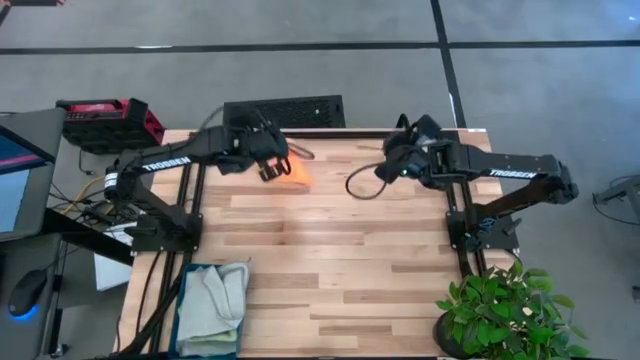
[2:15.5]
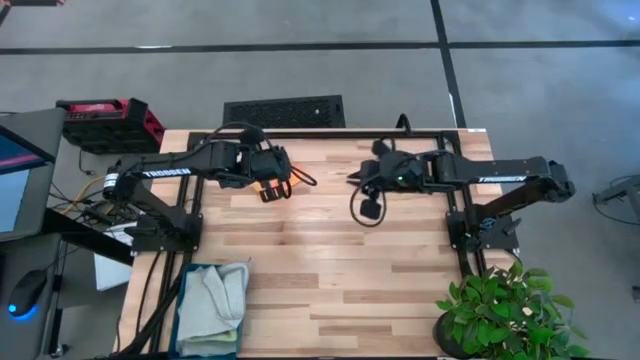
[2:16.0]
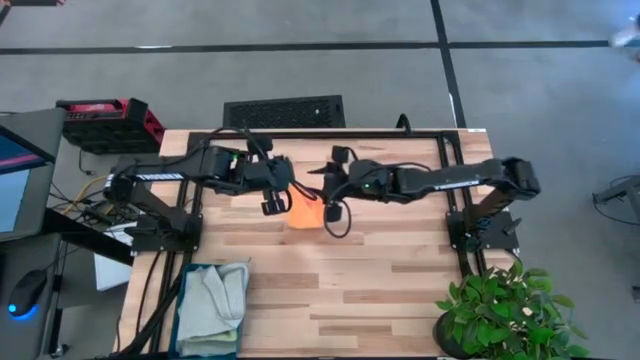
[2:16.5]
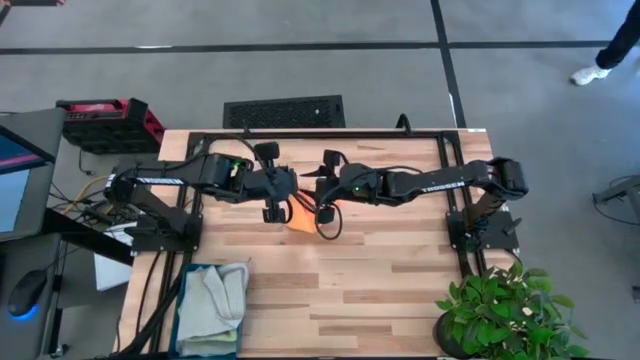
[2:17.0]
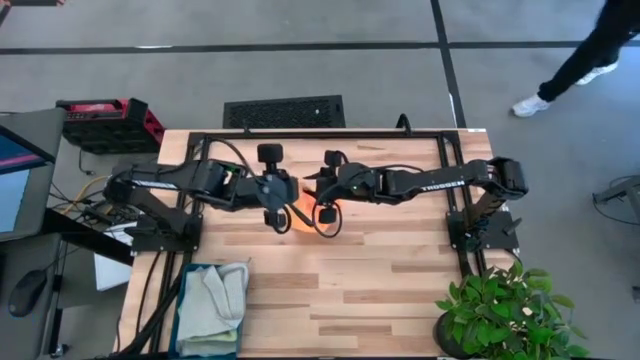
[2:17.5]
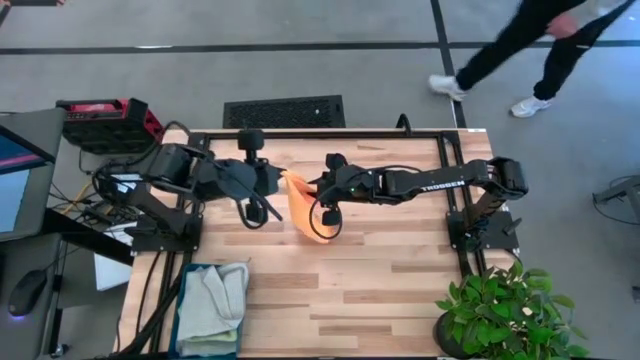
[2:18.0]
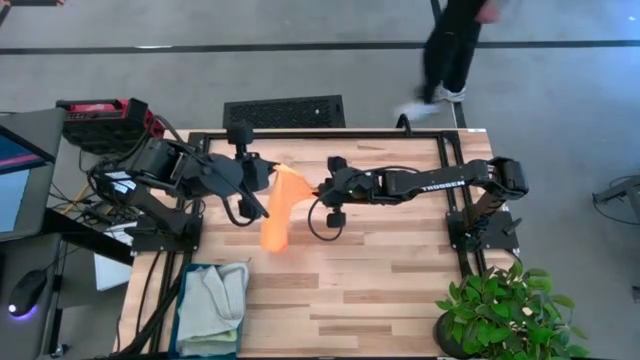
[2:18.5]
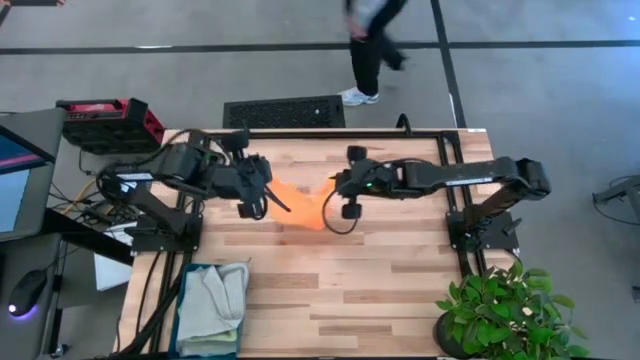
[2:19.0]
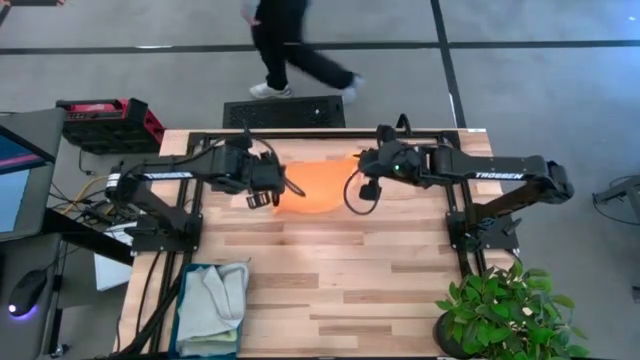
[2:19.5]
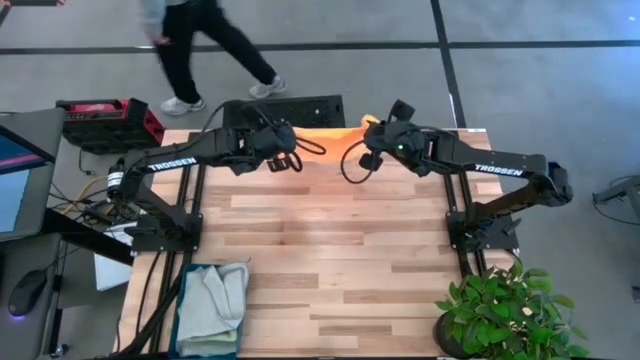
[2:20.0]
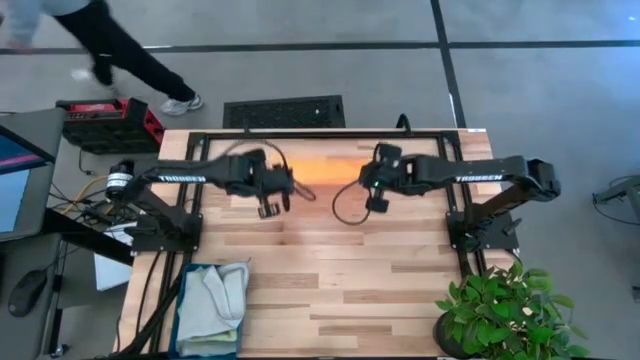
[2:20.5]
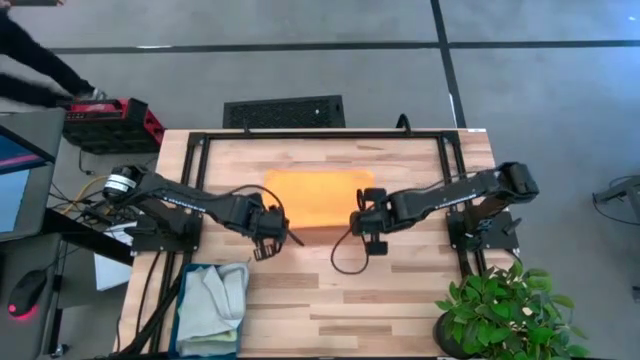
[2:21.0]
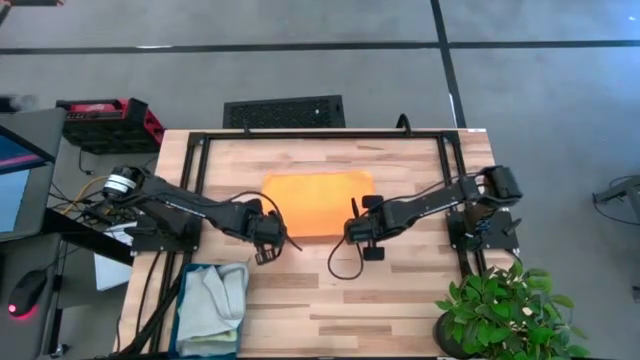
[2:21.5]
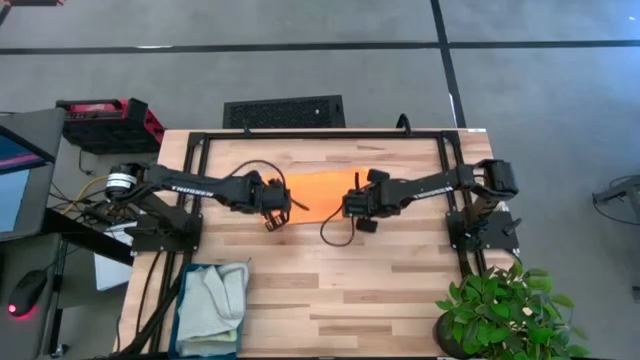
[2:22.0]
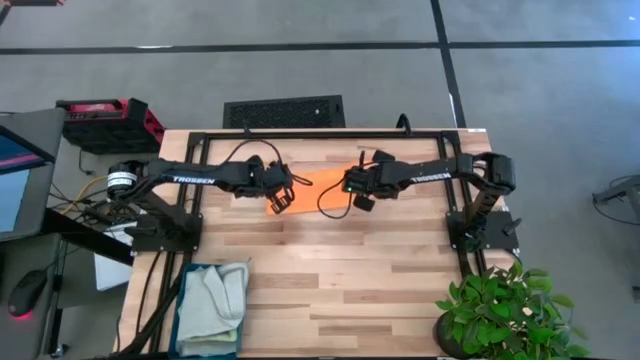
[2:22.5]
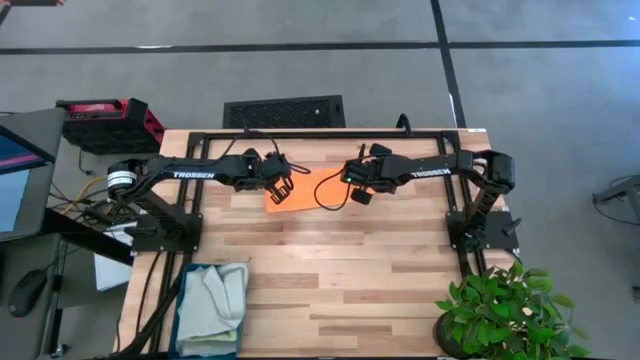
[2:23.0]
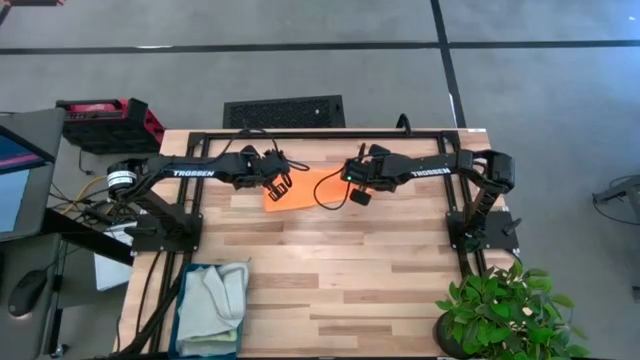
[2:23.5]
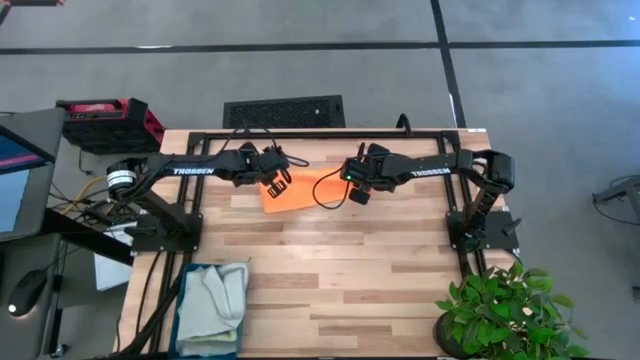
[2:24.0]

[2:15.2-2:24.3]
Task: Fold microfiber towels
Fold the orange microfiber towel

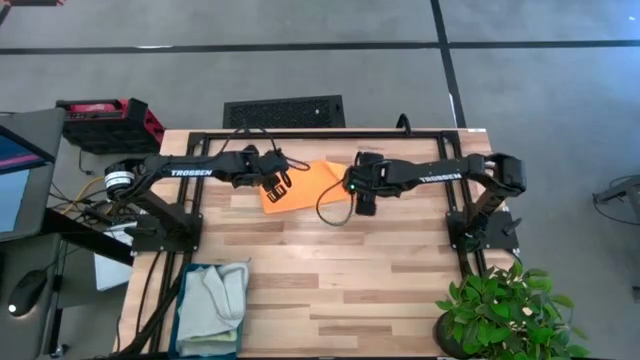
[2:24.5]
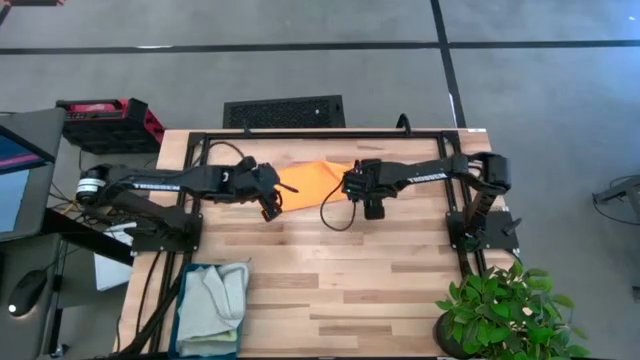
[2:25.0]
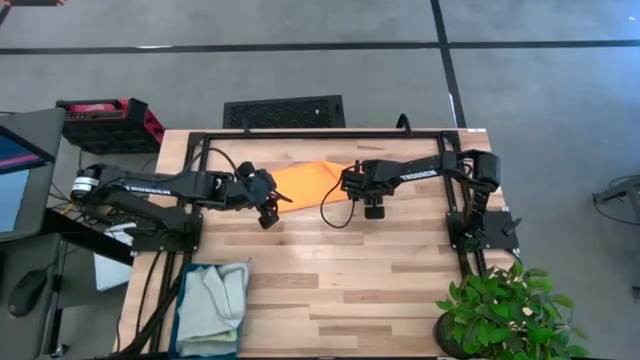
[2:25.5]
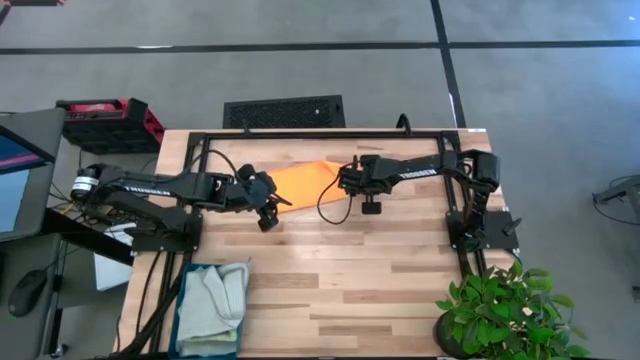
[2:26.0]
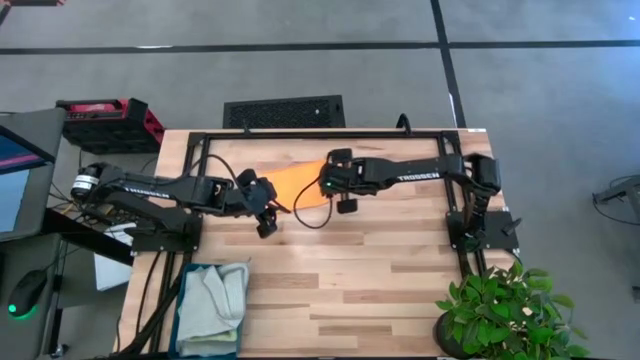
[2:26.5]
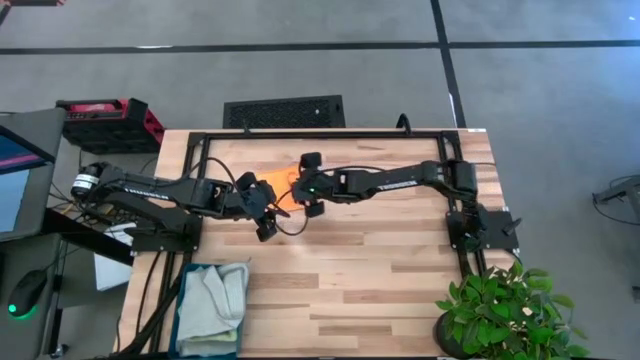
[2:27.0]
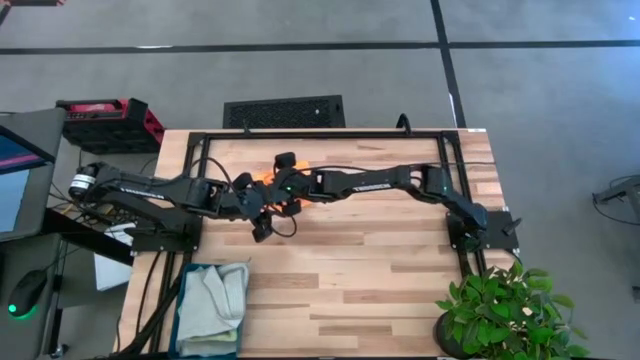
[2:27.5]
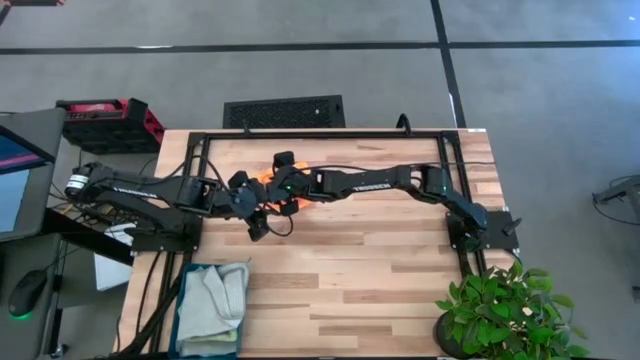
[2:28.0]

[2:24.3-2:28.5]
Fold the orange microfiber towel

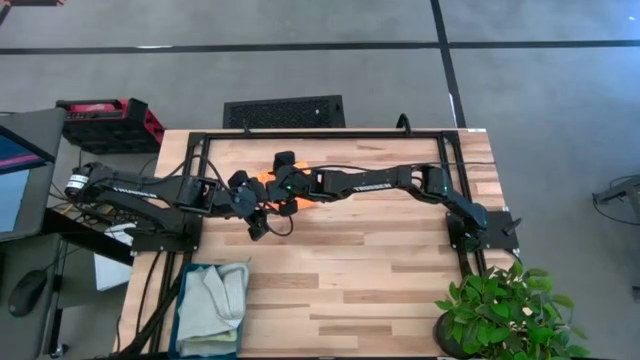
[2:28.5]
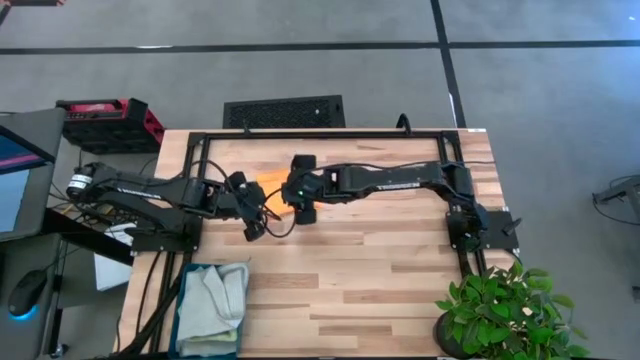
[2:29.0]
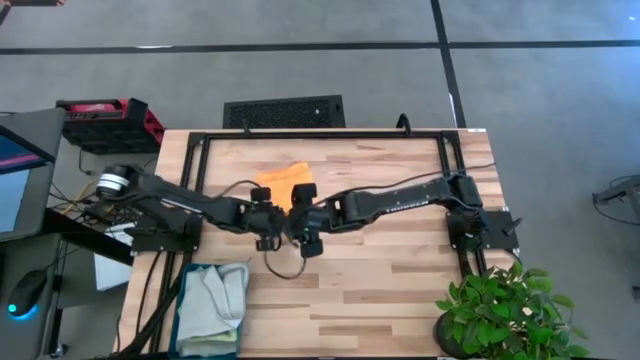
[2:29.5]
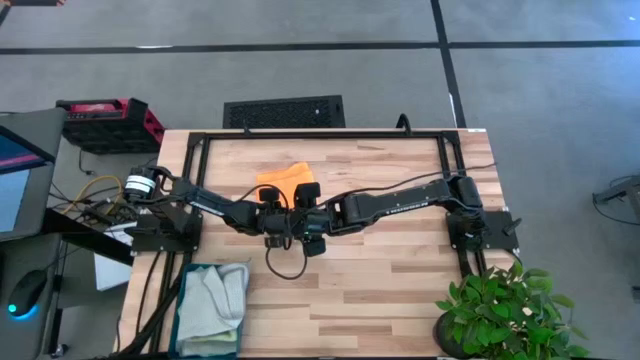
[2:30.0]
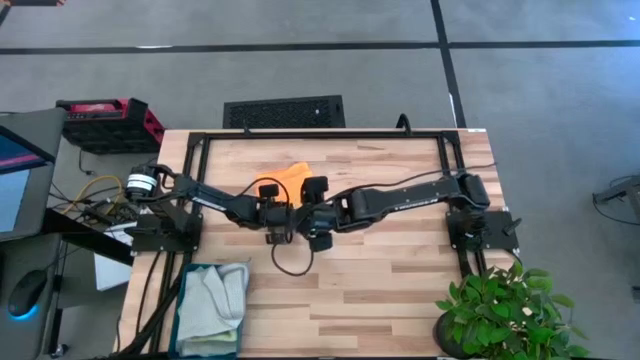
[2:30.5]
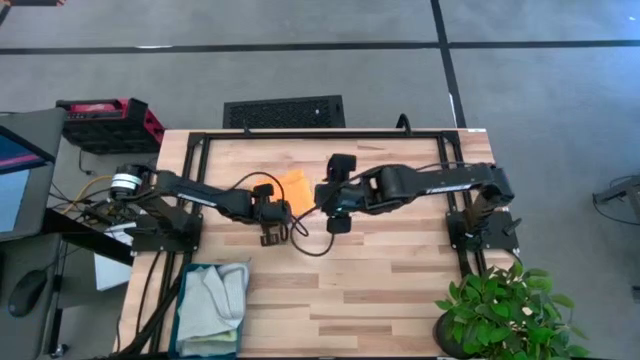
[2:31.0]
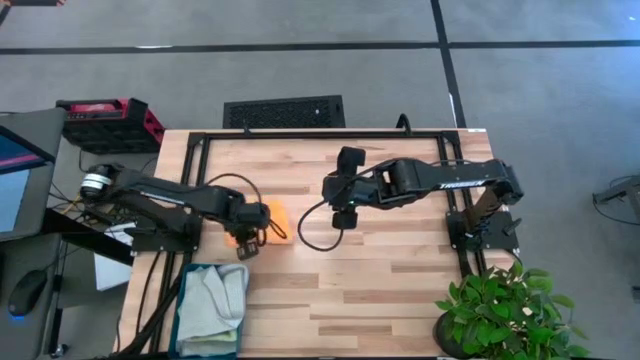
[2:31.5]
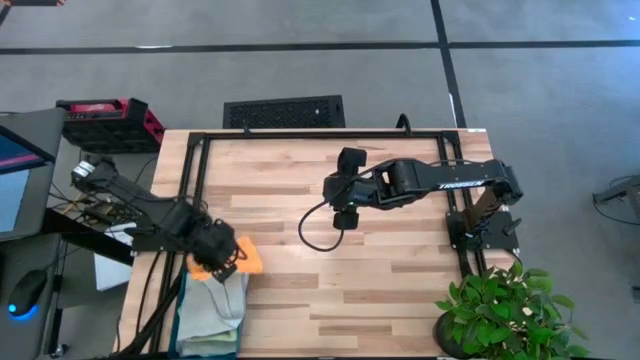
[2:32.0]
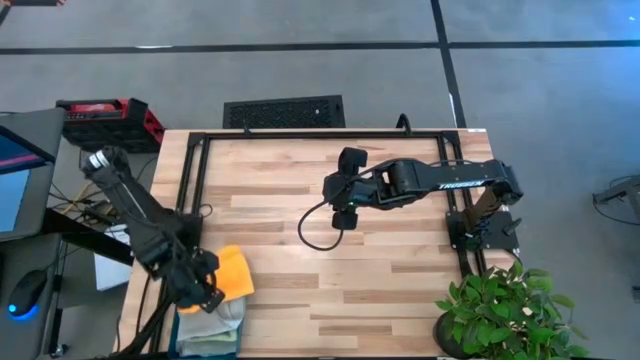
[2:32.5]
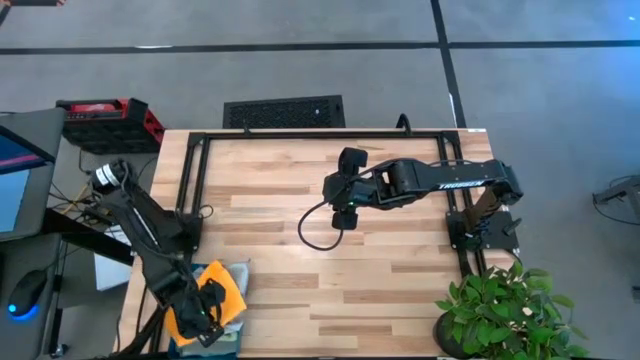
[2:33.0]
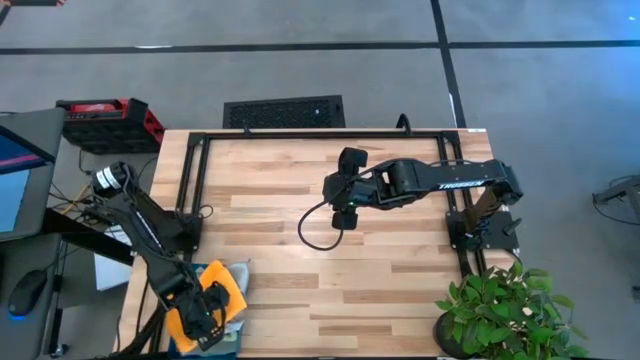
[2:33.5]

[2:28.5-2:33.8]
Put the folded orange microfiber towel into the blue bin

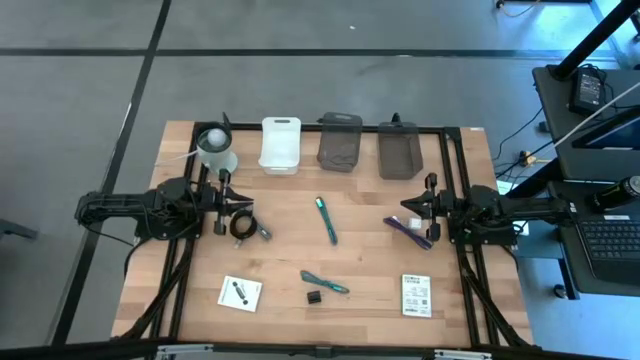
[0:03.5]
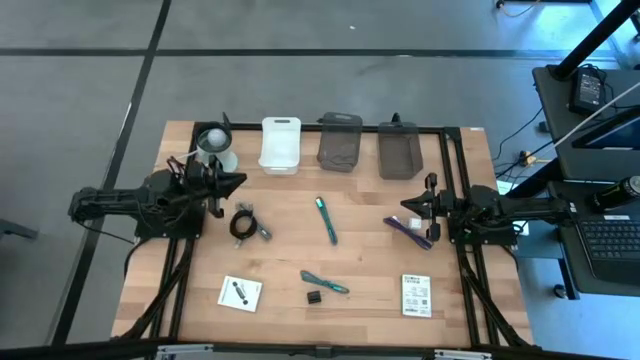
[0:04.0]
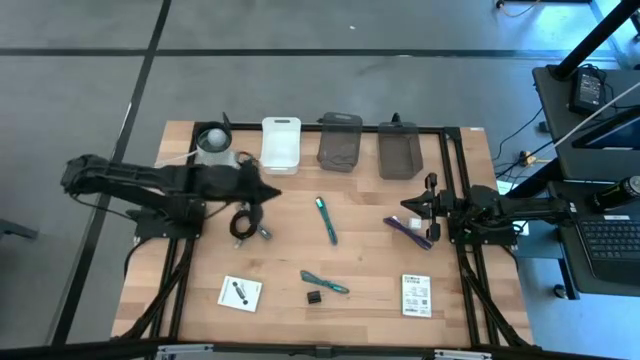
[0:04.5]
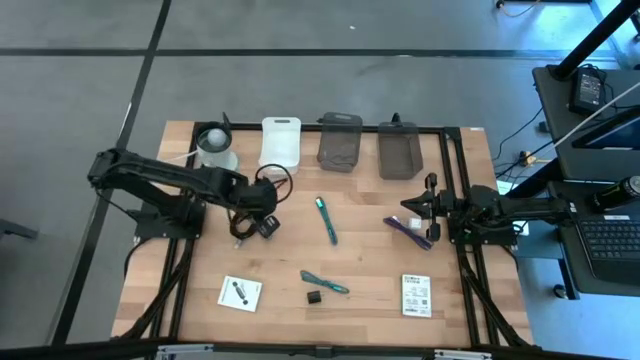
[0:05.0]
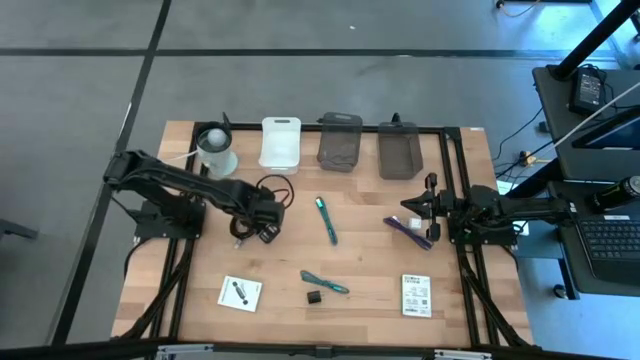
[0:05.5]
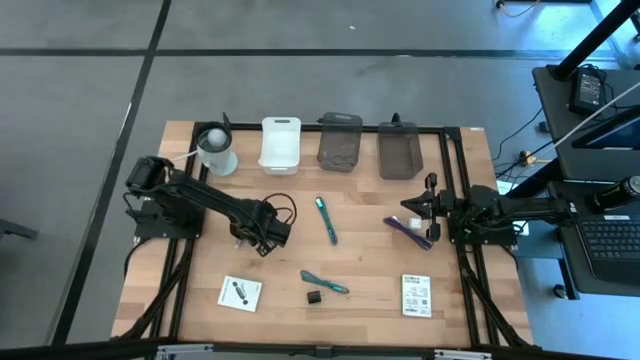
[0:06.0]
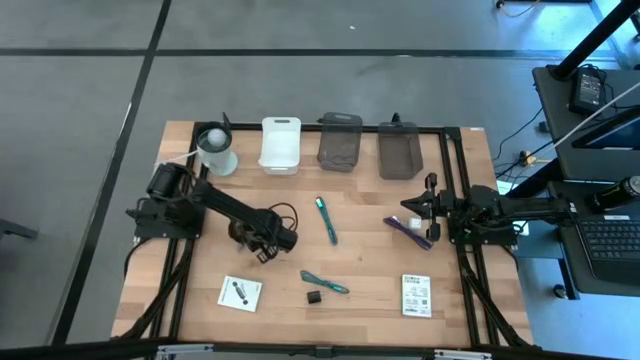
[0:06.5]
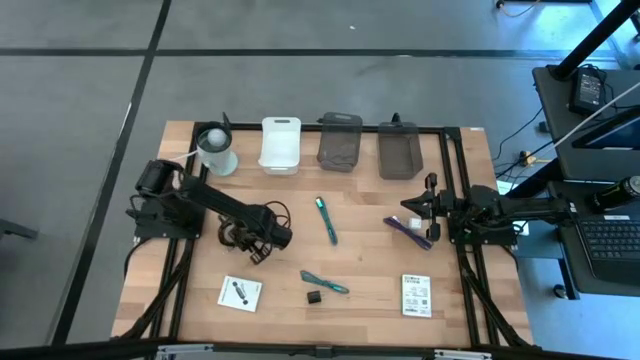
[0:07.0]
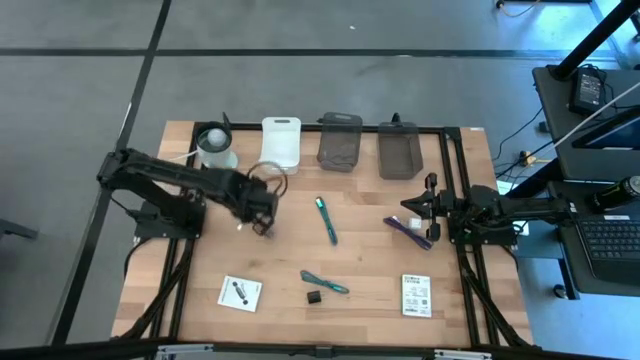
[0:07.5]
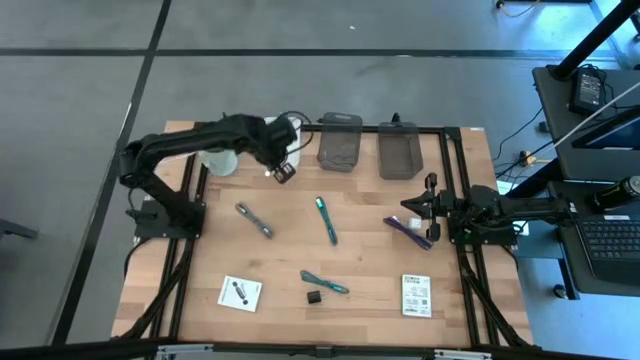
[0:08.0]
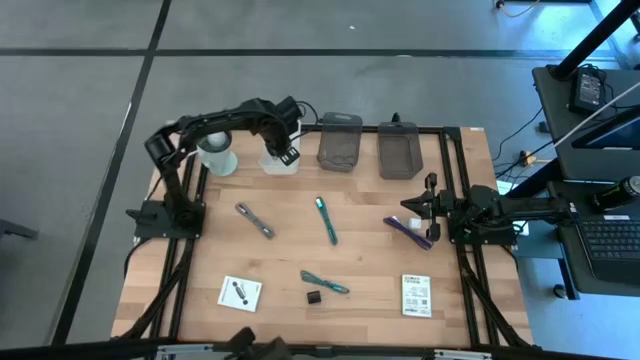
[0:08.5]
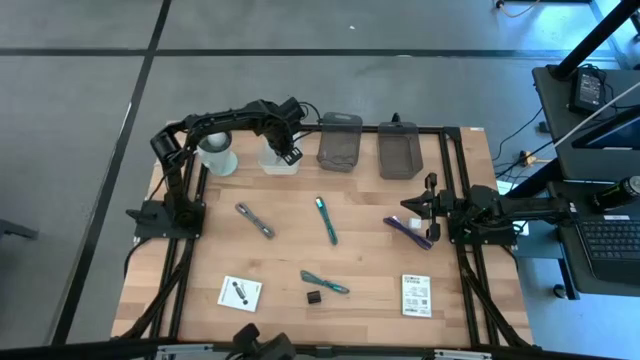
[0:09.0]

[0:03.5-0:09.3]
Task: Pick and place items into bin
Put the black charger cable into the white bin
